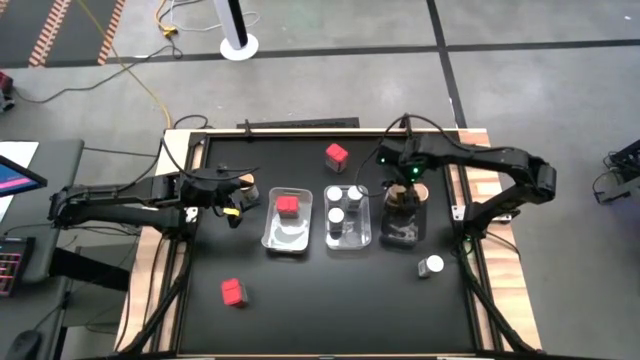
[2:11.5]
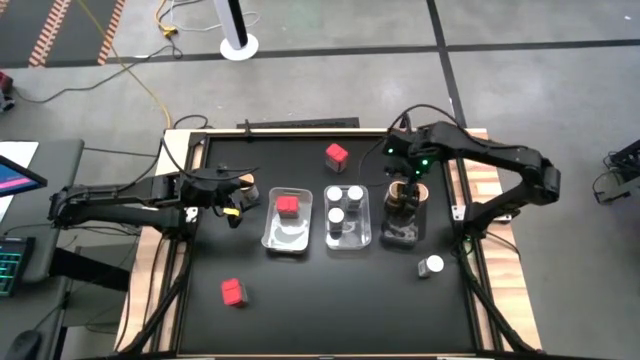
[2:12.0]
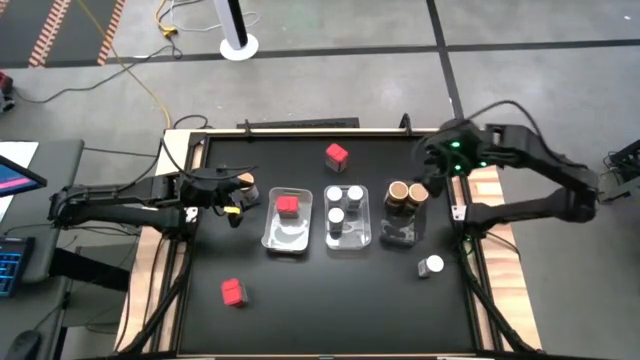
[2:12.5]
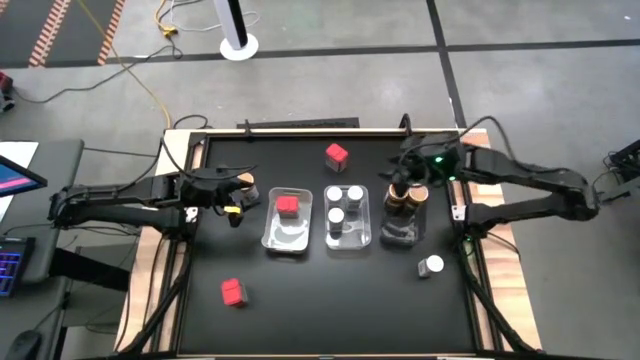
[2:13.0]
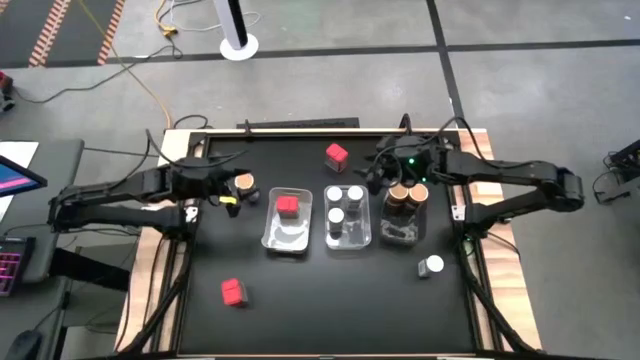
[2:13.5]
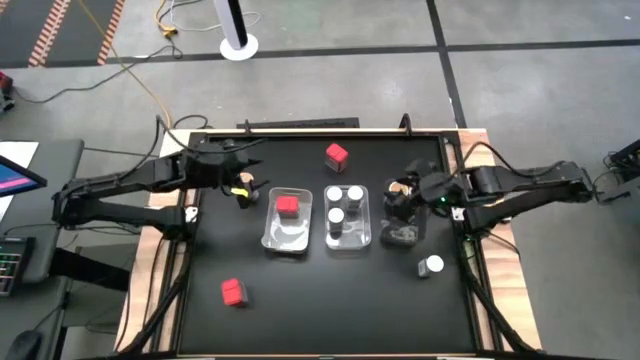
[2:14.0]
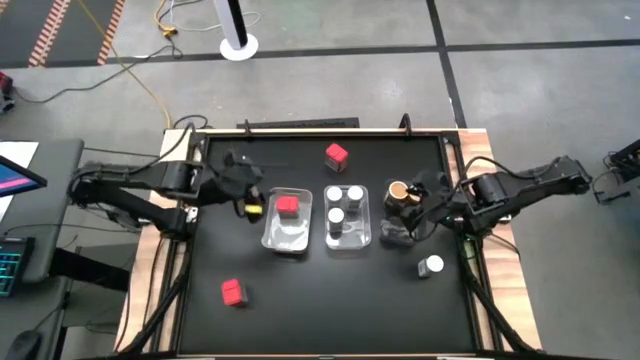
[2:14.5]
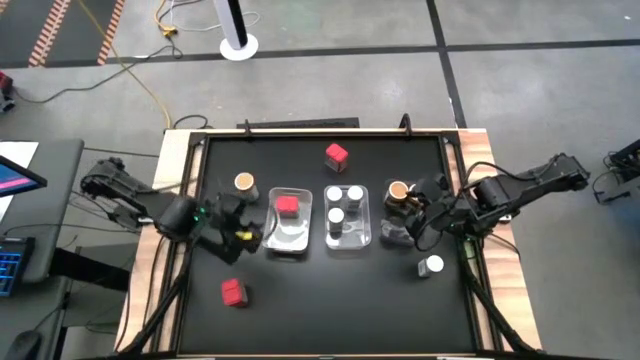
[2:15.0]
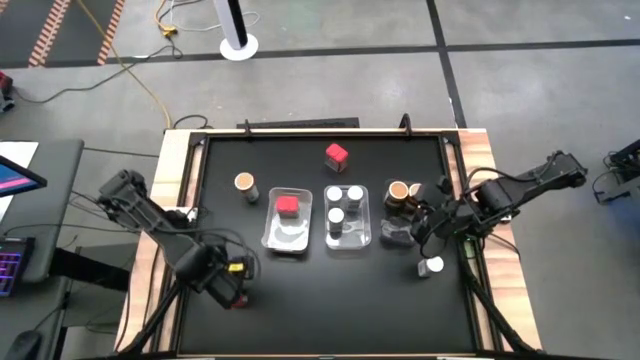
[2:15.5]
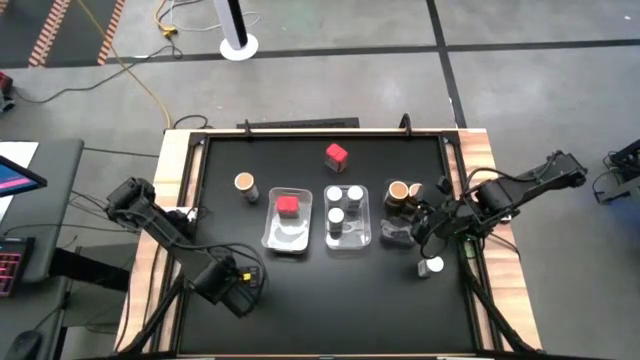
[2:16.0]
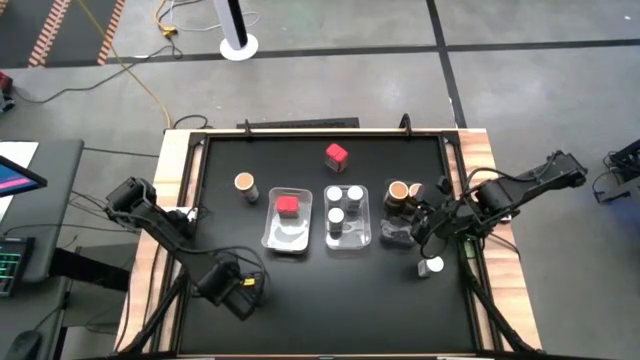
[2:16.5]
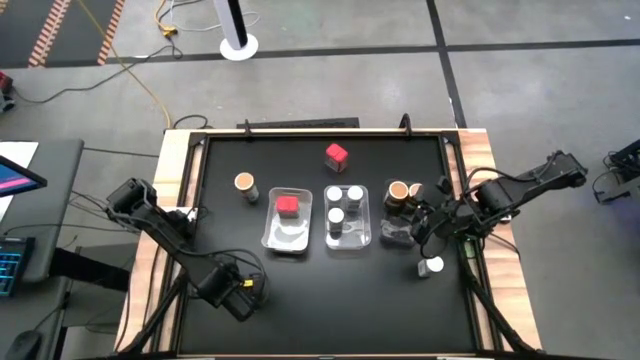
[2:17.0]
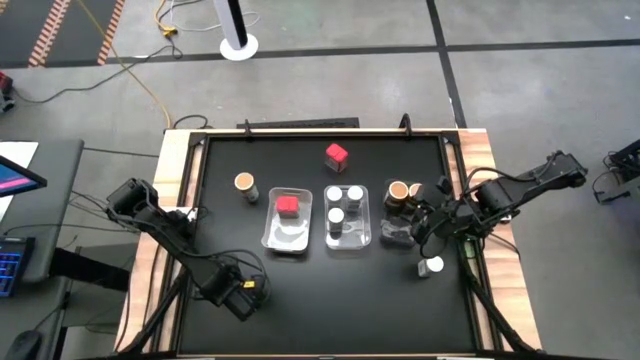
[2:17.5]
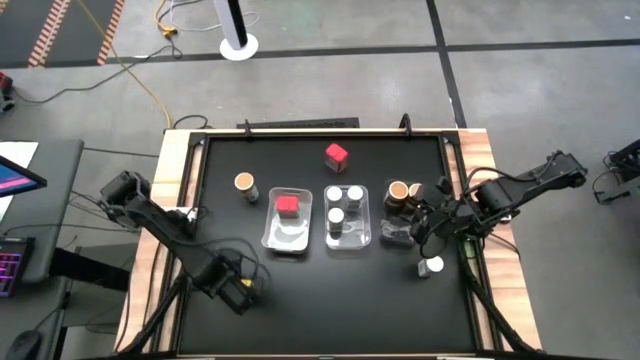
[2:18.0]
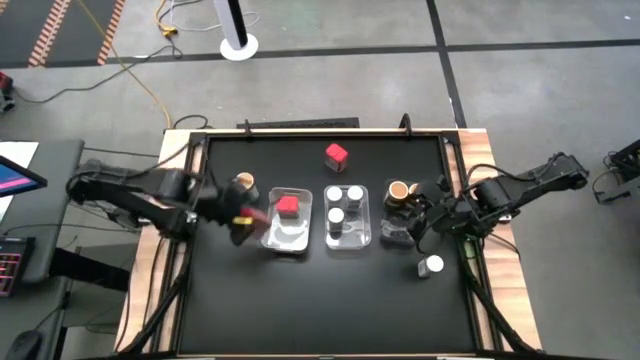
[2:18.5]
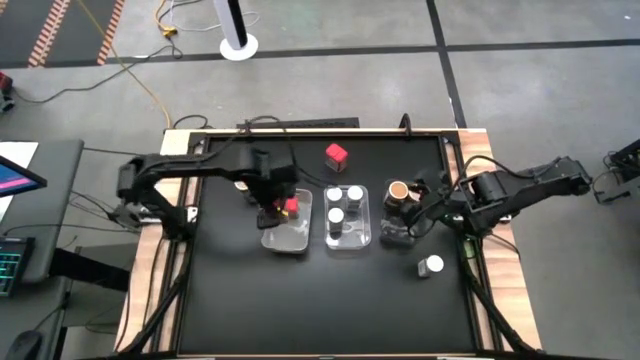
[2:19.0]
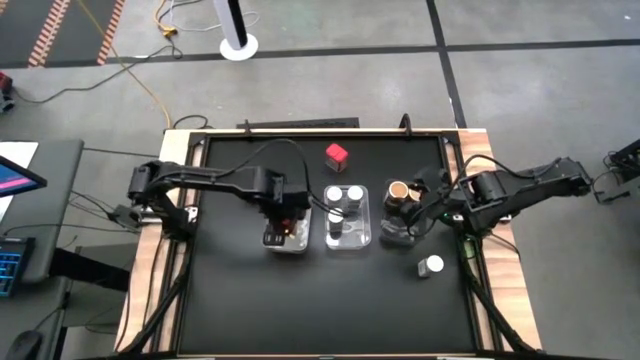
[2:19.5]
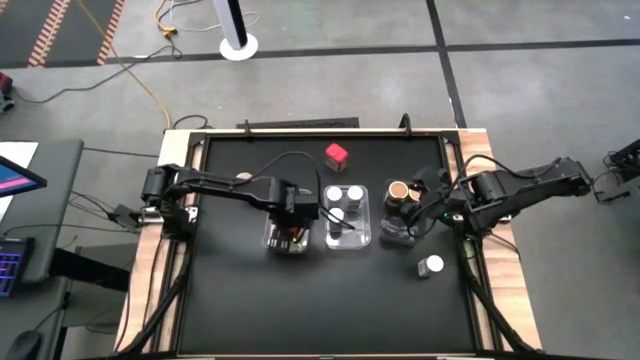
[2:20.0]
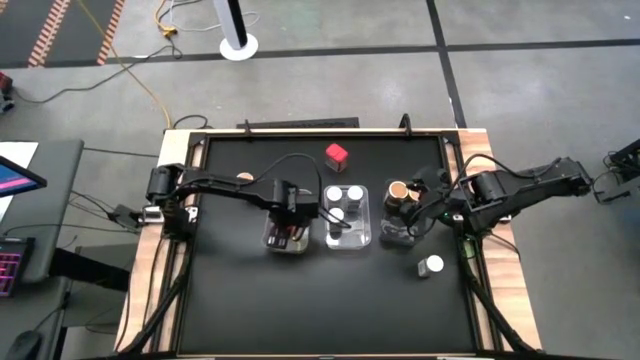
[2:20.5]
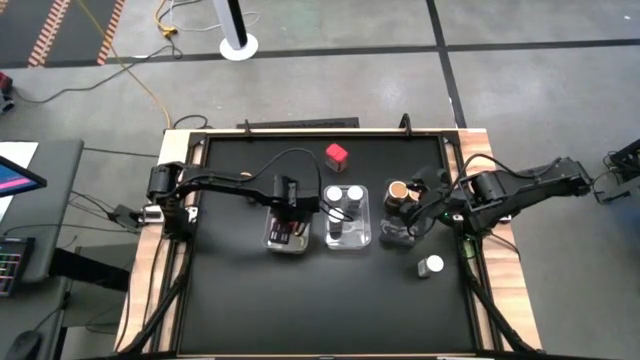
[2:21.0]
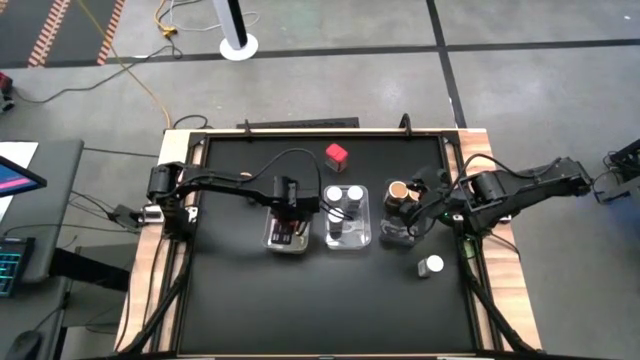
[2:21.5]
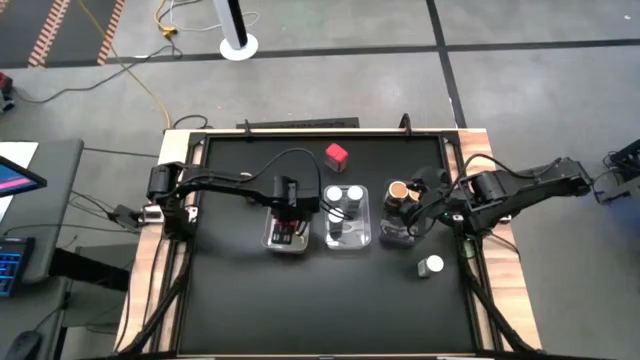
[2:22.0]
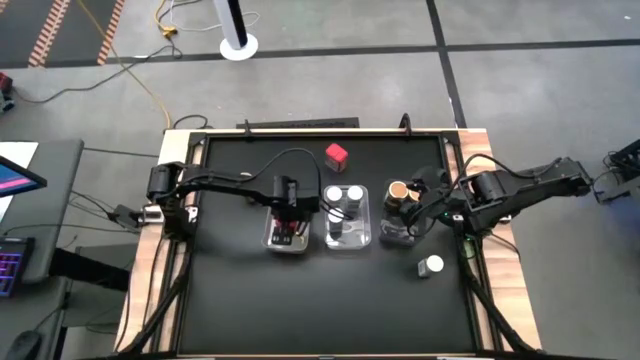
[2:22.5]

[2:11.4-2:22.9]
Task: Sort spices by type
Put the bottom red seasoning can into the white bin

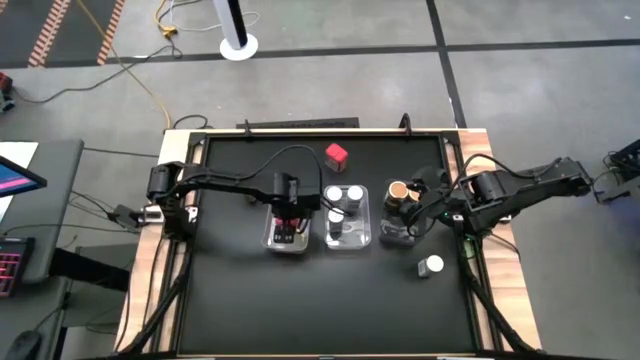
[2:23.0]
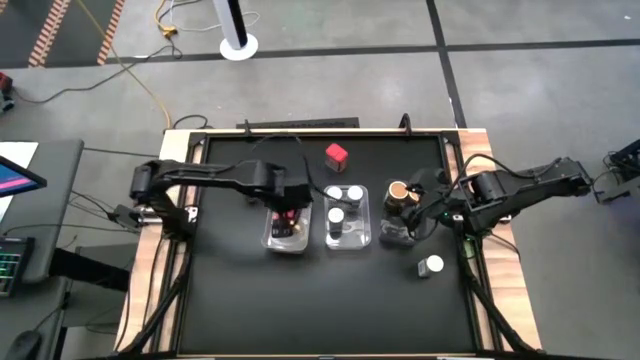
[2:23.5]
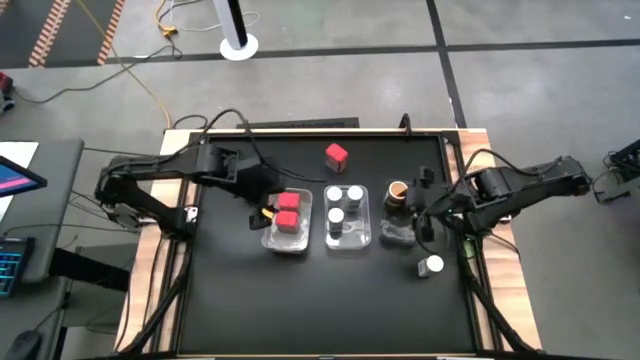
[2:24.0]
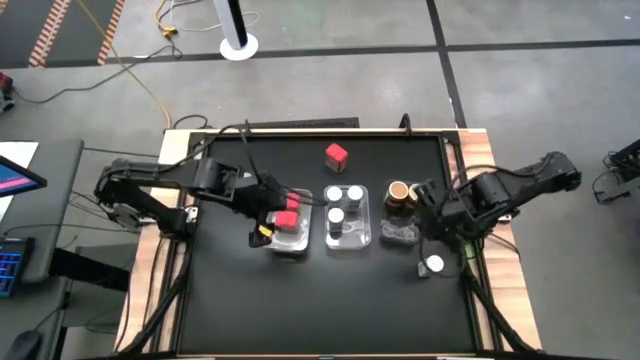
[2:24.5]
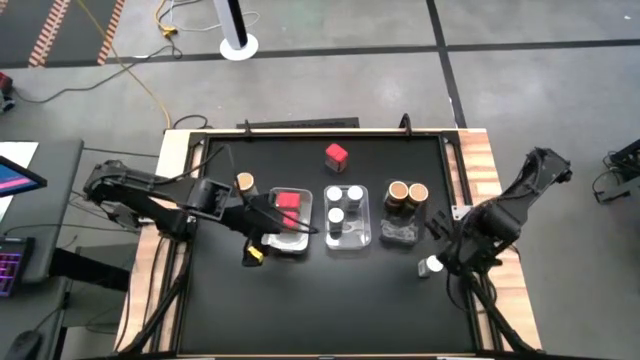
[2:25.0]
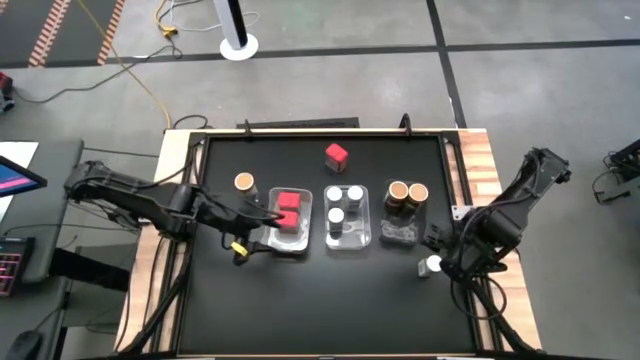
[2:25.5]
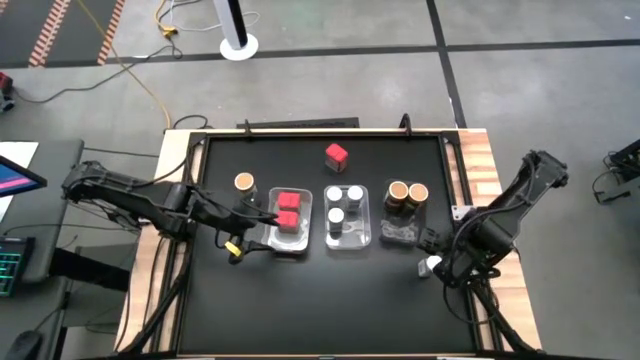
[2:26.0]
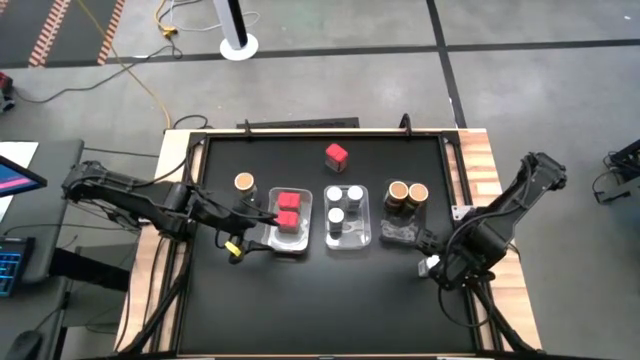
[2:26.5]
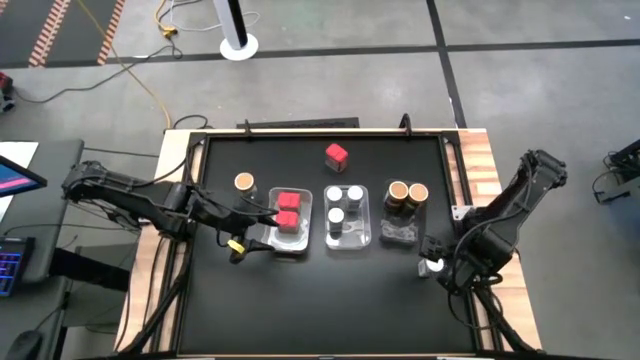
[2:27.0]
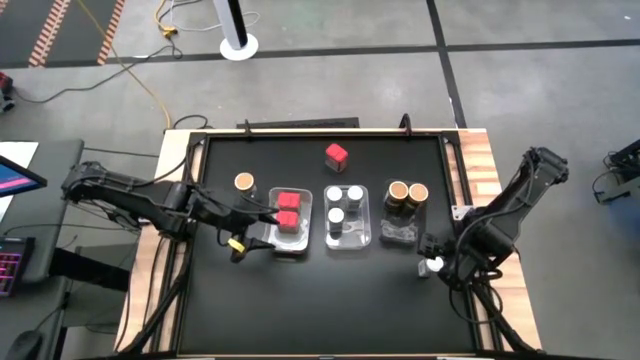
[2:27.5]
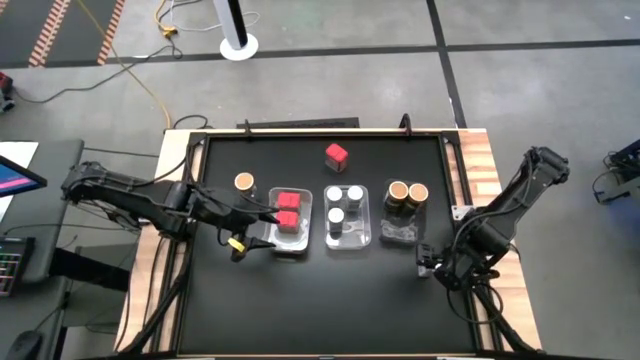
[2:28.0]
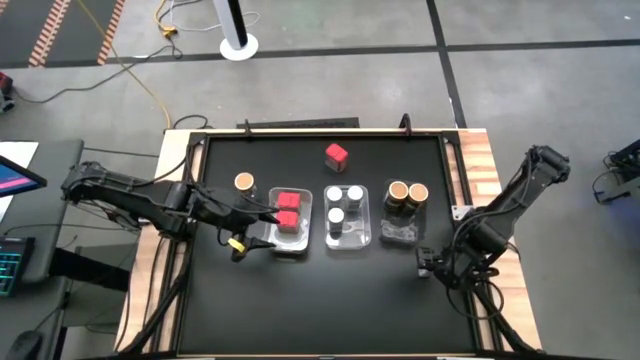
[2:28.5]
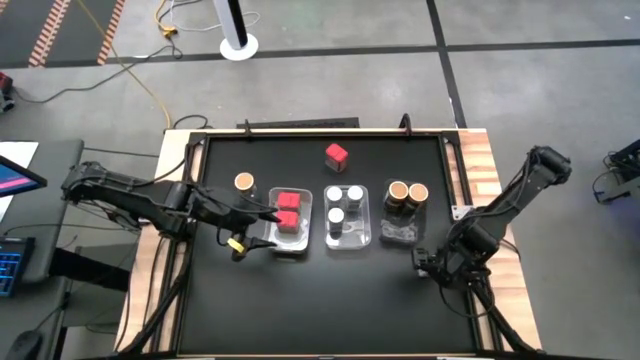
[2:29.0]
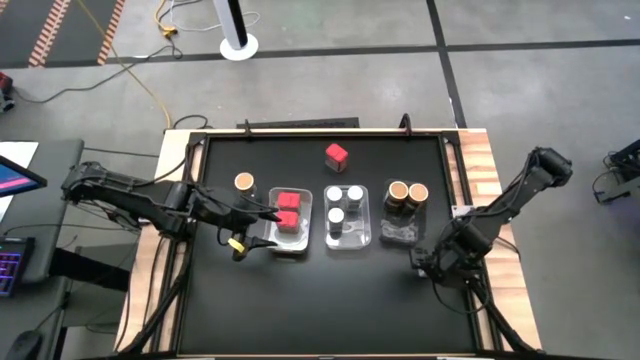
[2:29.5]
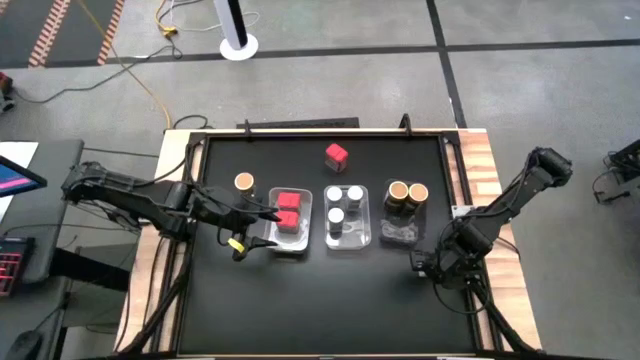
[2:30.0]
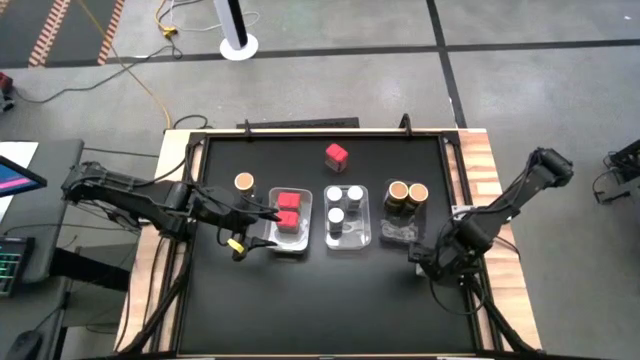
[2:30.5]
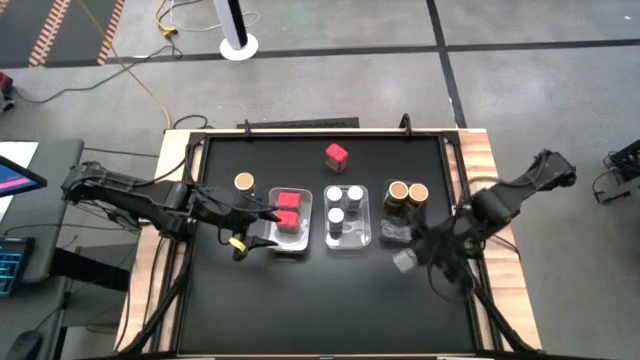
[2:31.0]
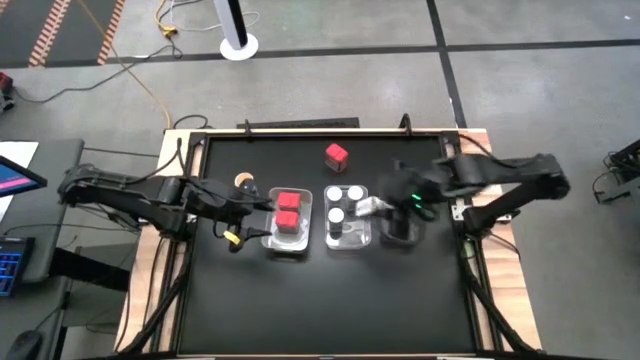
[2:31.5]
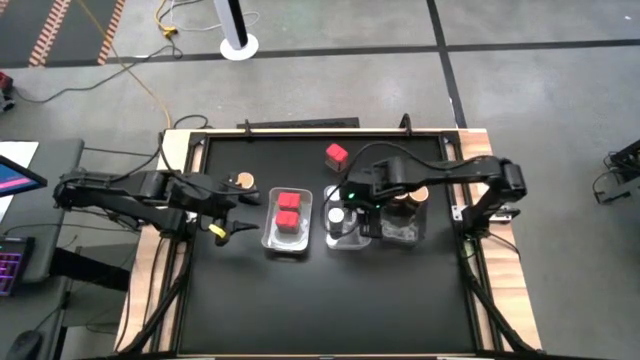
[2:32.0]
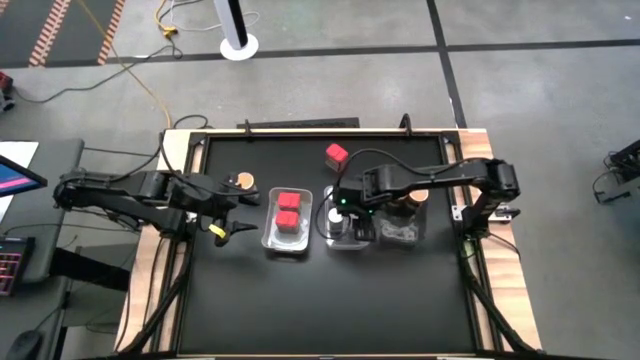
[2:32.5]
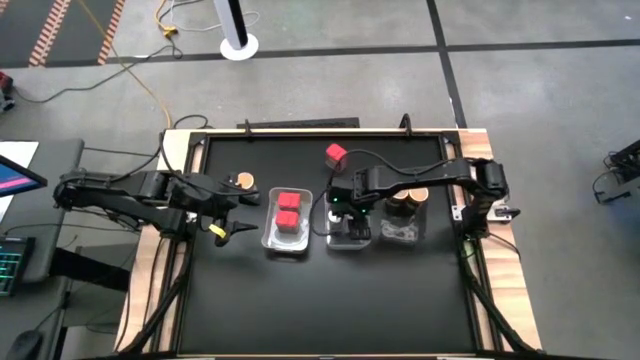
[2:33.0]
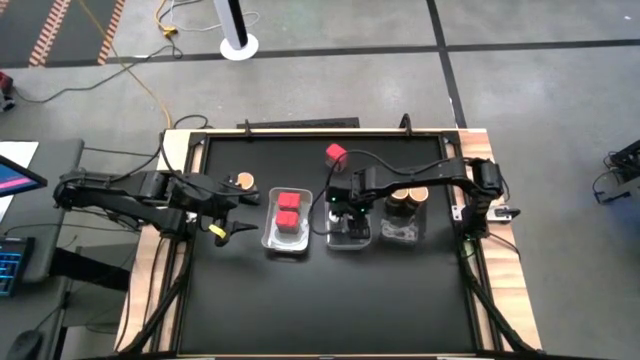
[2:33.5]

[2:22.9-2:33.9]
Put the white seasoning bottle into the transparent bin
